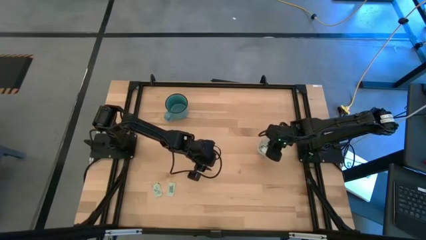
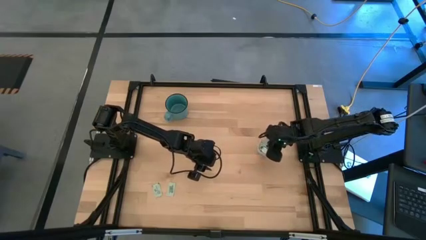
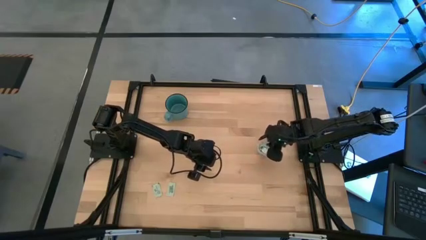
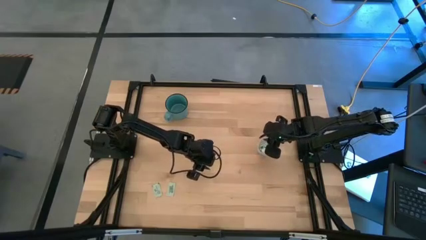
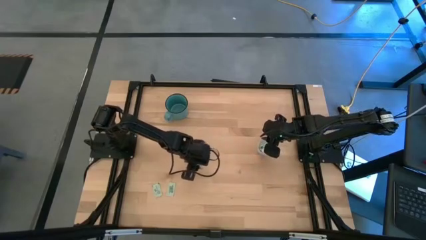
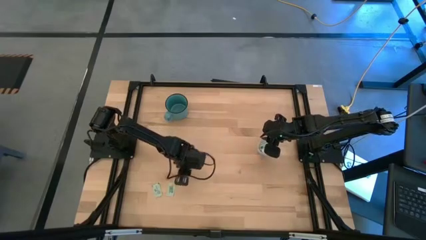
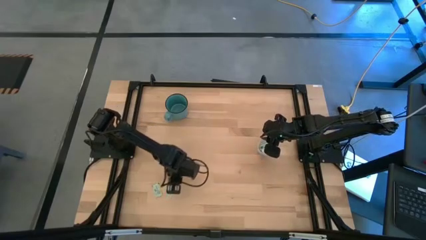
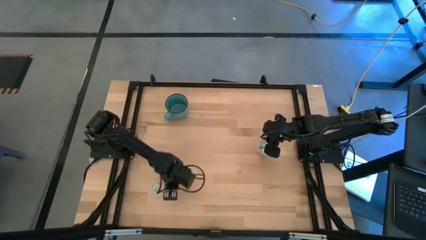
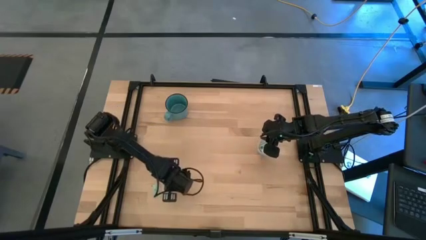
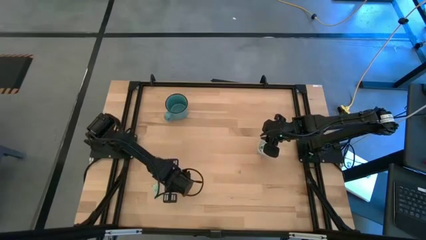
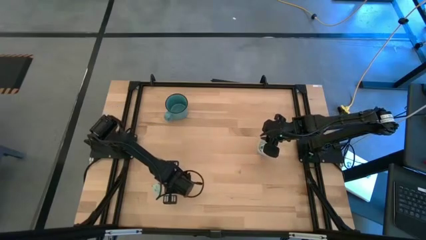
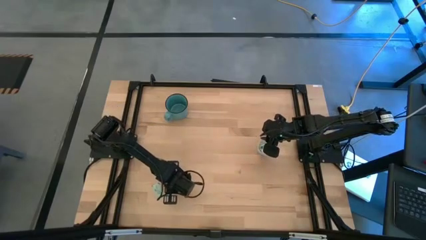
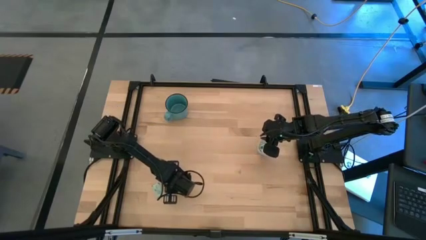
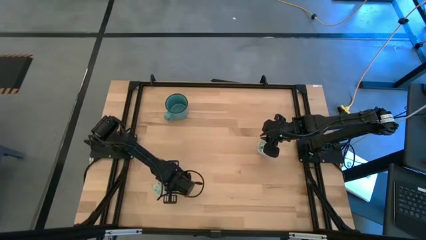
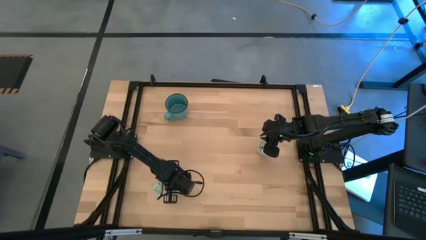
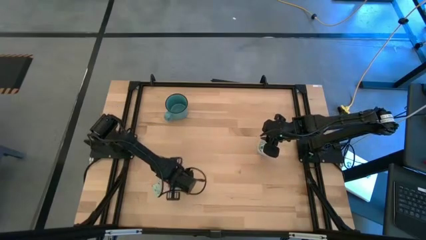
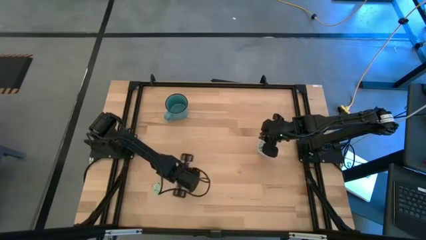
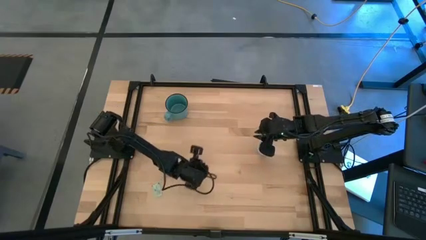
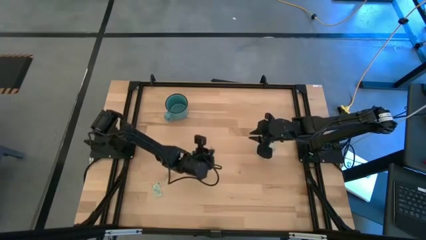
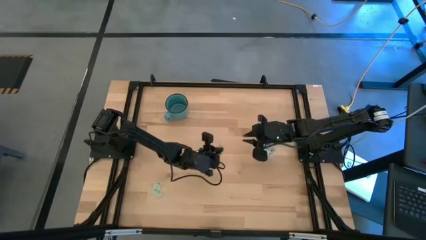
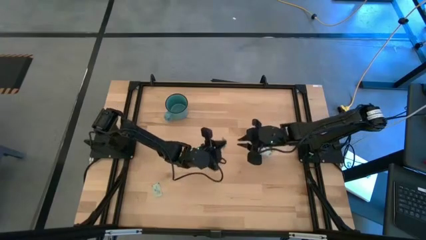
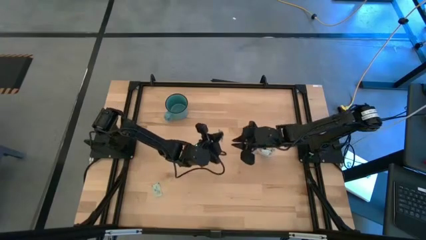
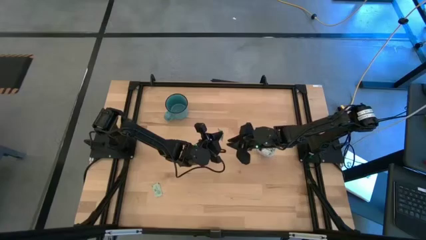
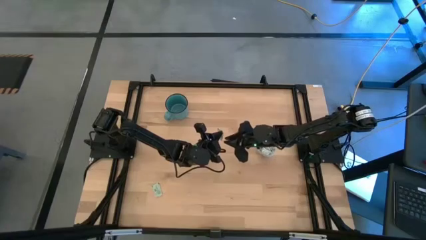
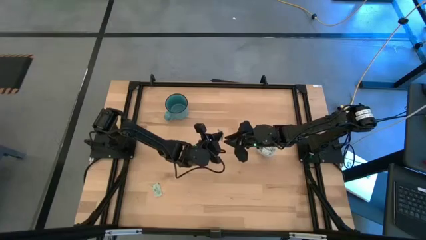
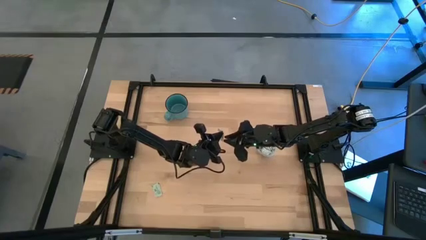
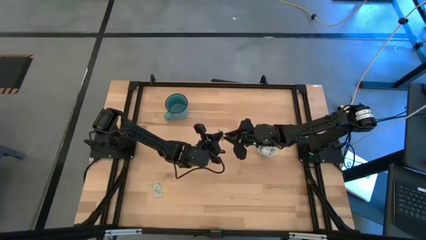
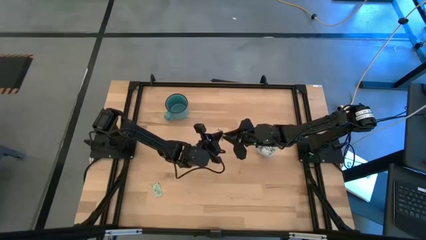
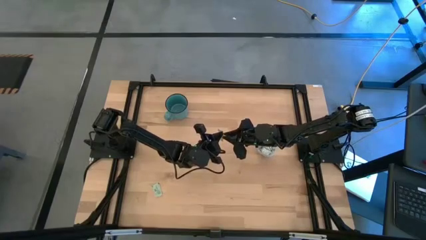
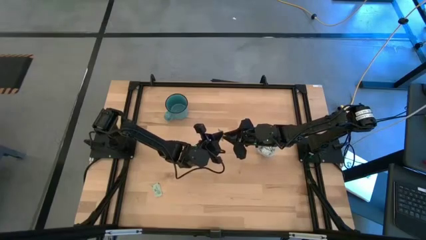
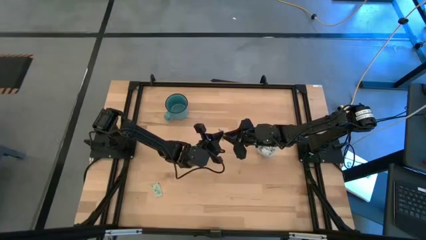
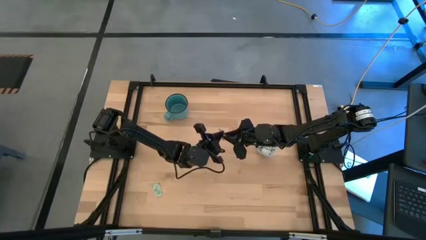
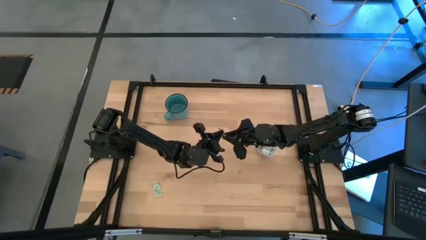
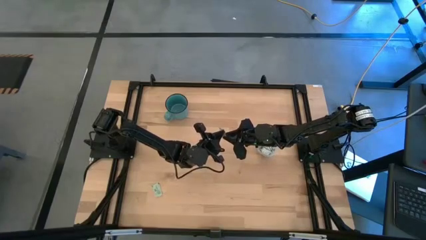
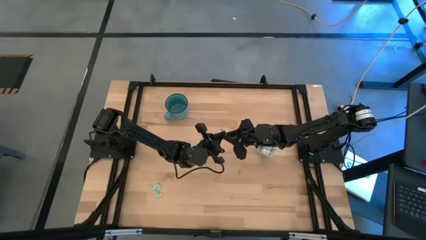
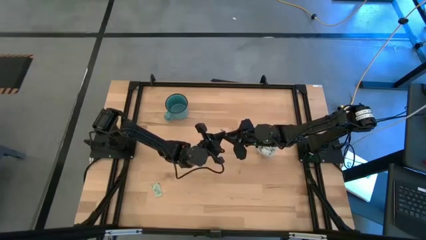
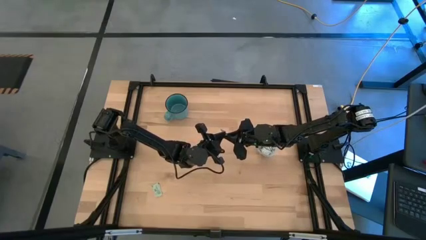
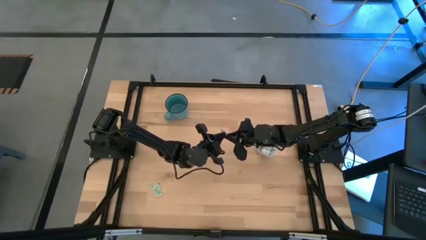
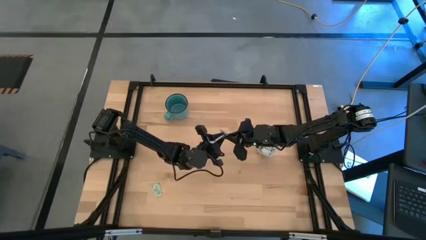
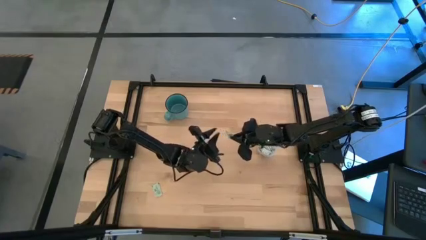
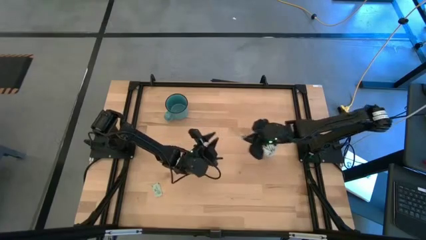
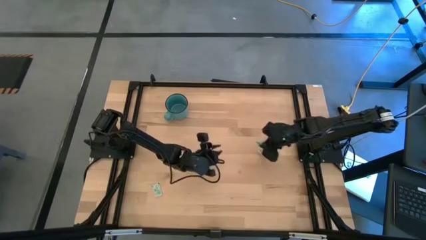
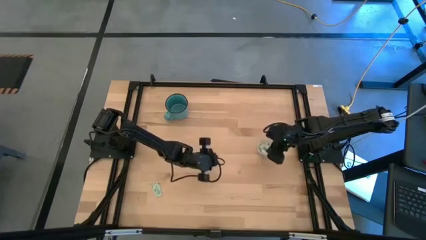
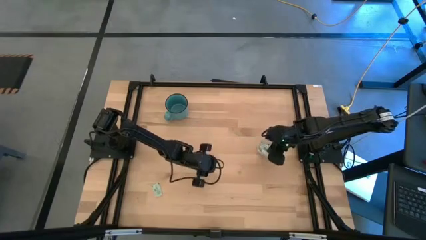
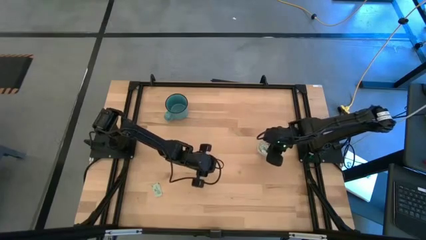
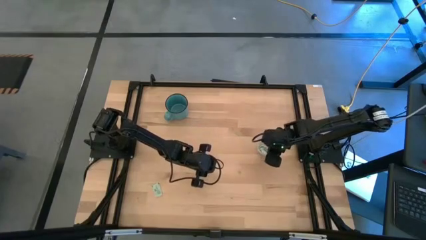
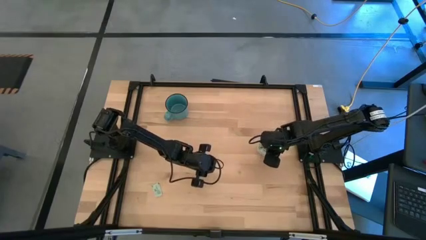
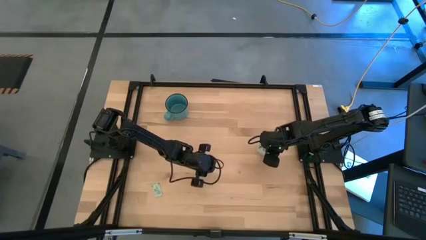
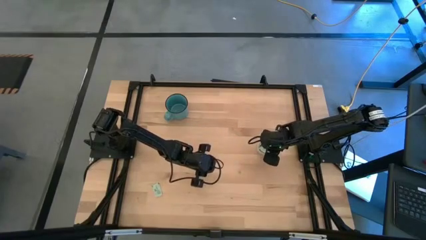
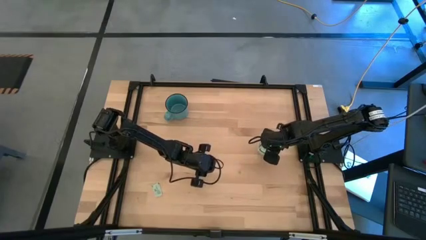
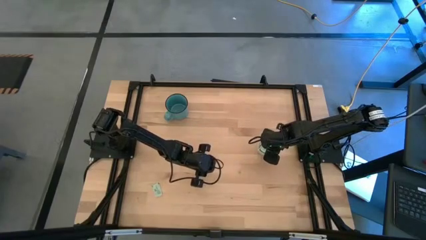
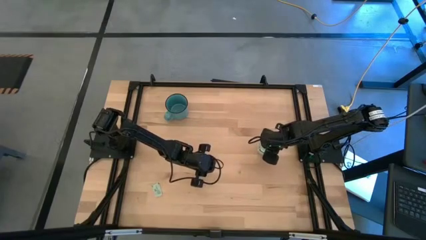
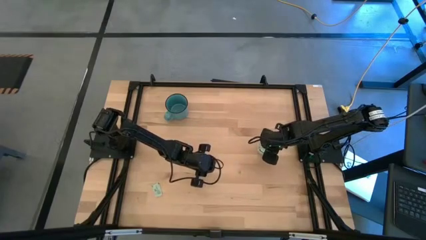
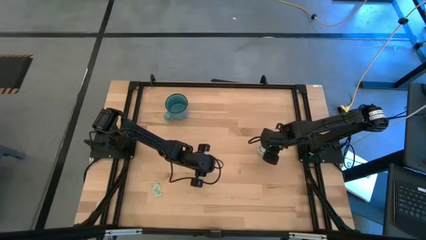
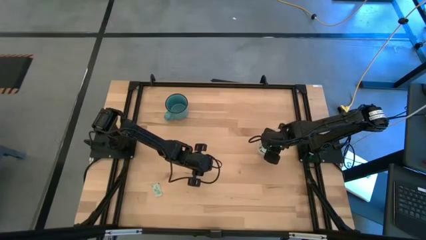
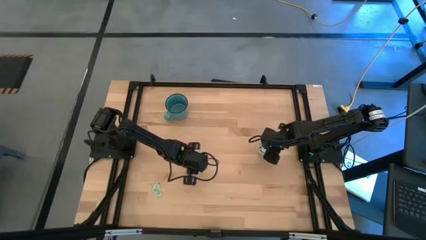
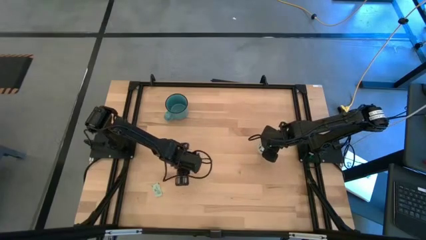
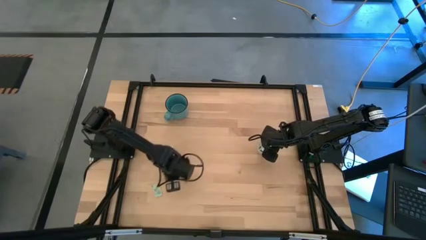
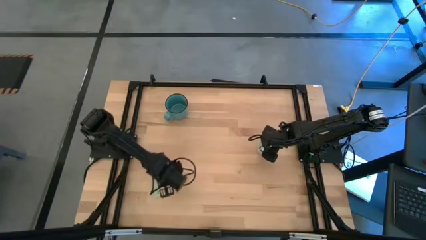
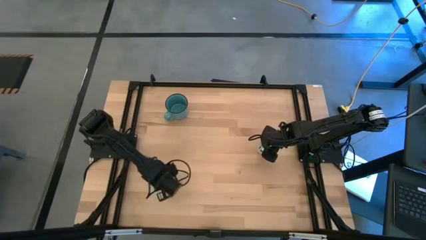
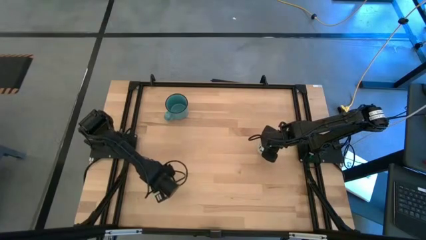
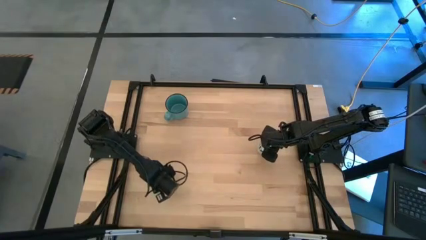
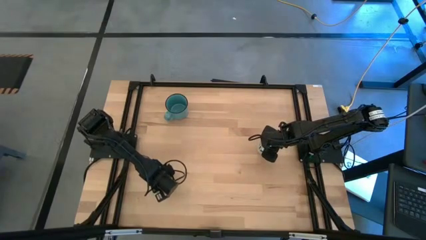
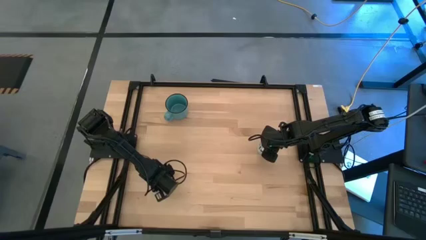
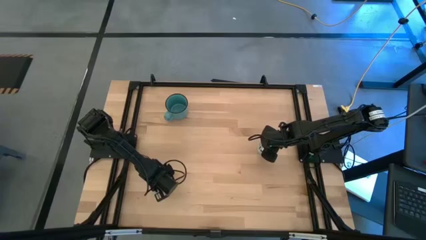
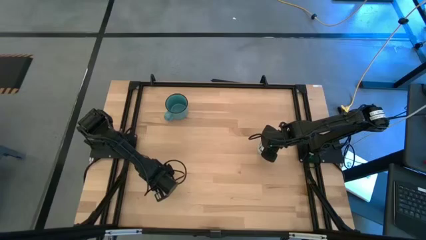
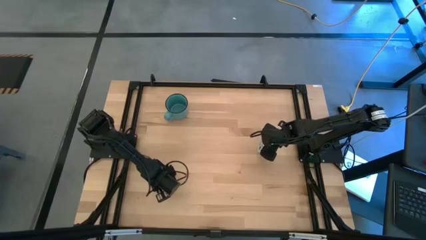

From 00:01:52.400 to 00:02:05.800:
Task: Pick and place Stevia / Truvia into bins
Put the stevia packet into the transparent bin
